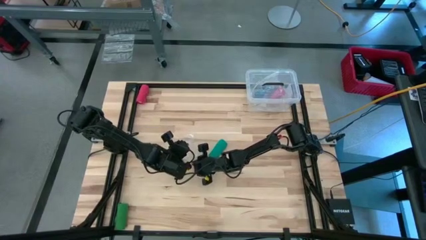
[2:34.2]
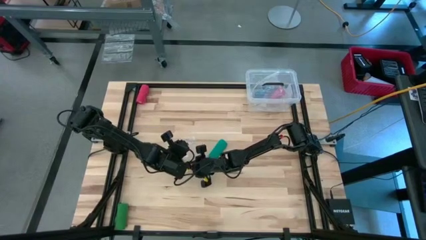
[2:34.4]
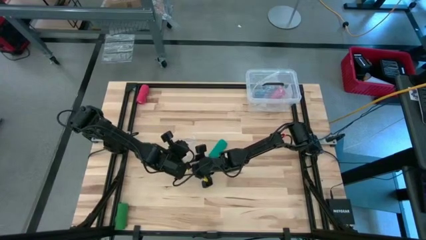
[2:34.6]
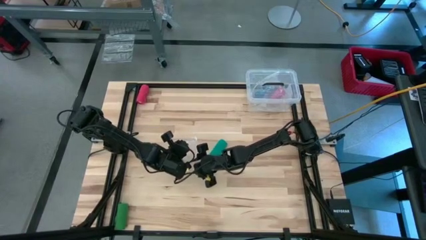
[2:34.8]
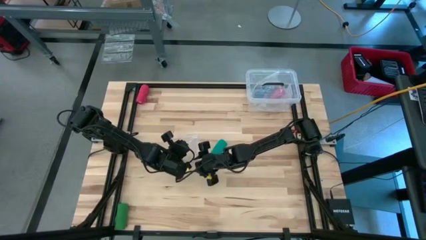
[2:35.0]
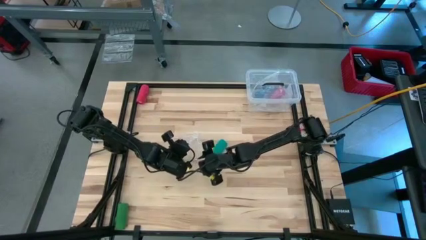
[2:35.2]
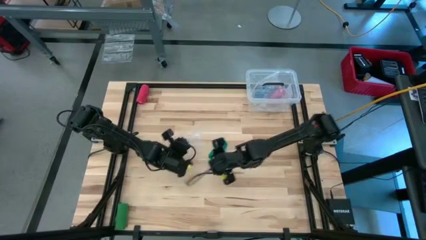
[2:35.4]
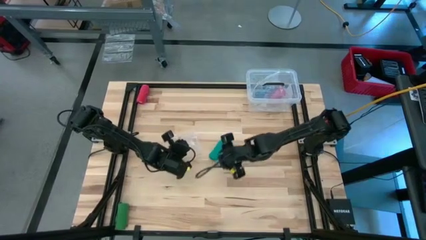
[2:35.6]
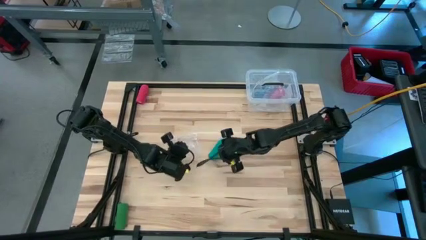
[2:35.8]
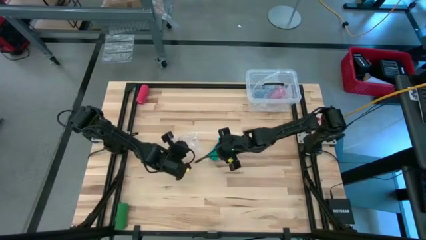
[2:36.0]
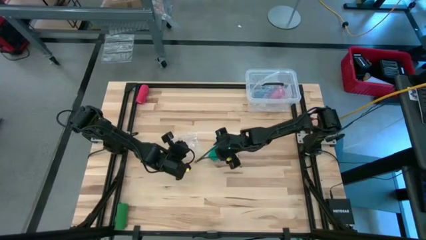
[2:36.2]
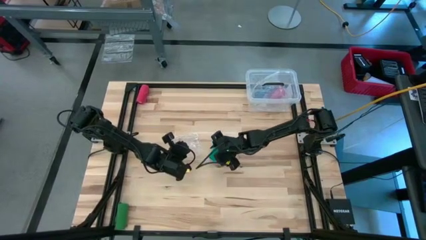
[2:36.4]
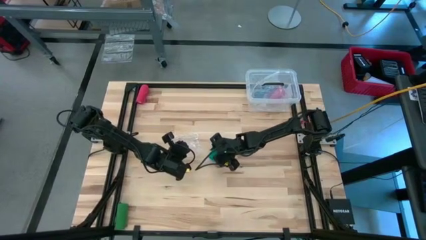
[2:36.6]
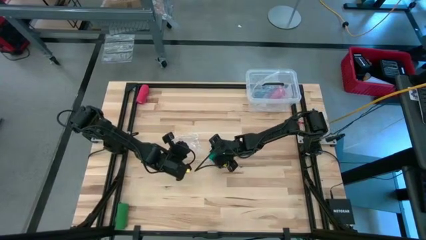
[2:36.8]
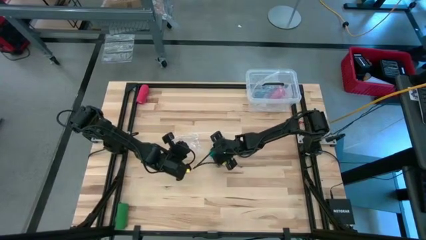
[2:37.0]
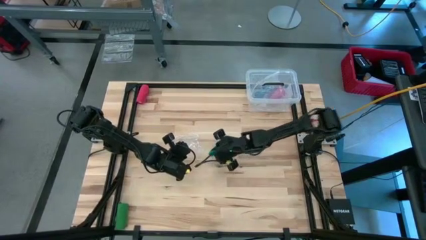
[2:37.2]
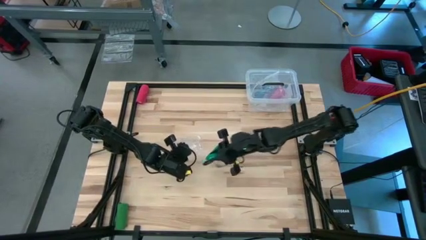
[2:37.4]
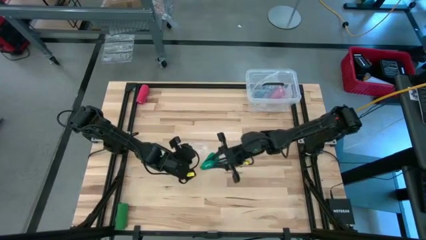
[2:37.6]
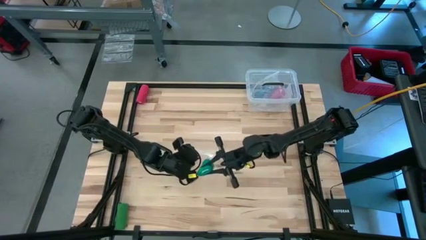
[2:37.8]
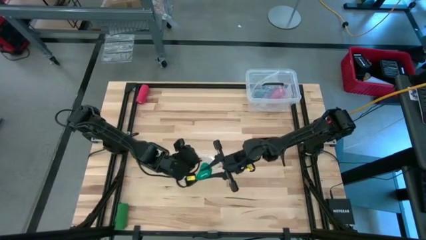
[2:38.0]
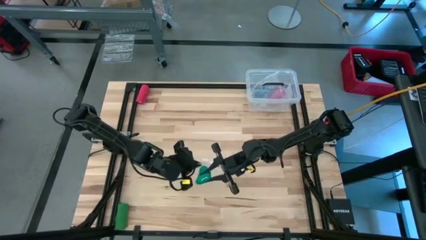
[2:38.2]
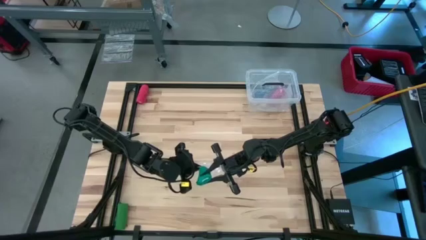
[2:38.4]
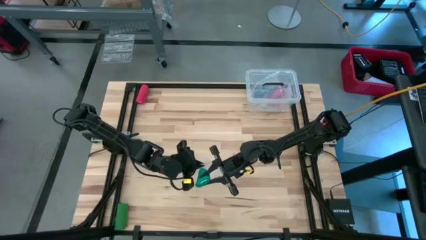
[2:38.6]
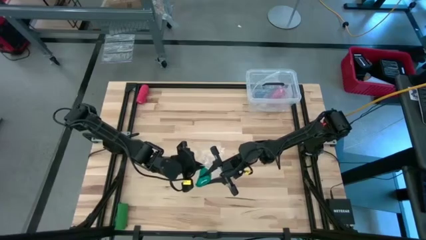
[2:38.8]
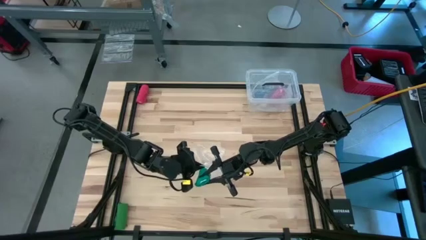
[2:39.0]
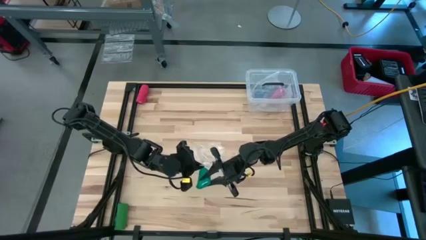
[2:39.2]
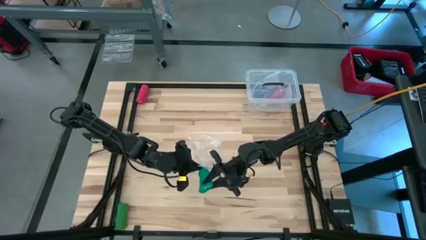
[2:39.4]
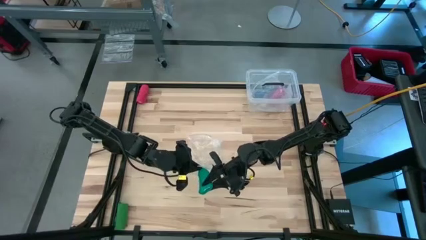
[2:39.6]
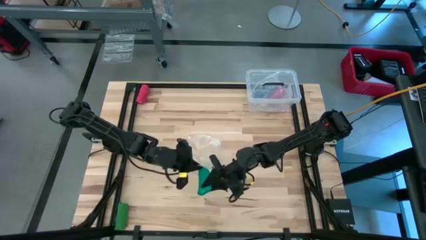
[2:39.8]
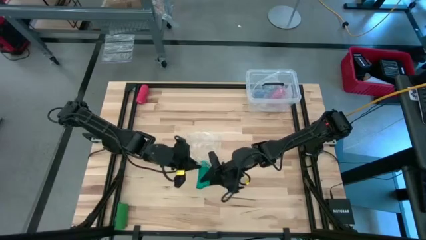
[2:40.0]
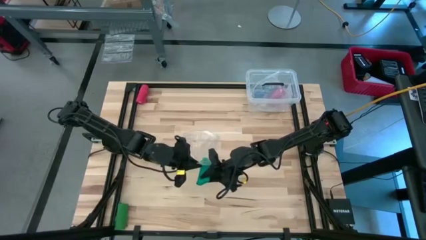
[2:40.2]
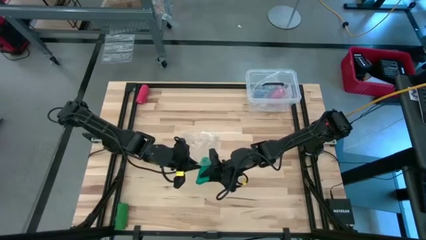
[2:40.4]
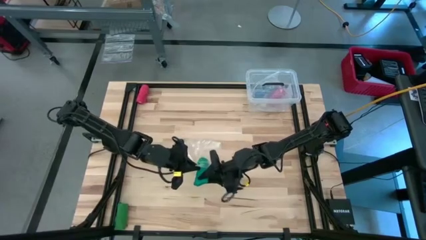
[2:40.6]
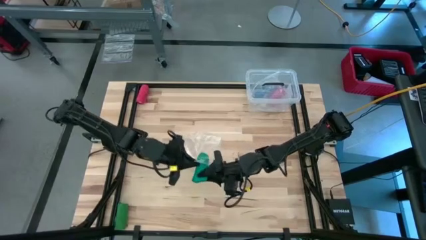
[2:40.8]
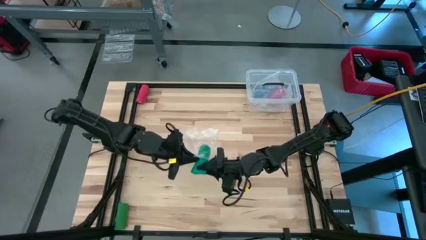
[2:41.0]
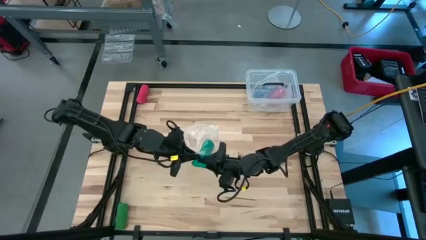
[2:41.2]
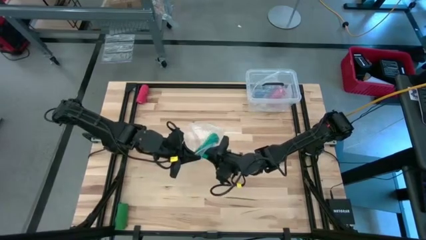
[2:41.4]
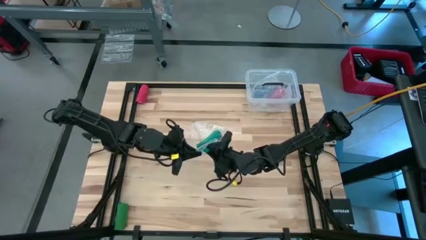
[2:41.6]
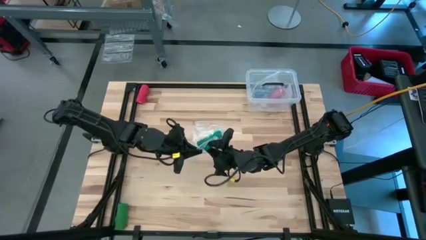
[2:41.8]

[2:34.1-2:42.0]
Task: Roll bandage
Put the rolled green bandage into the transparent zip bag

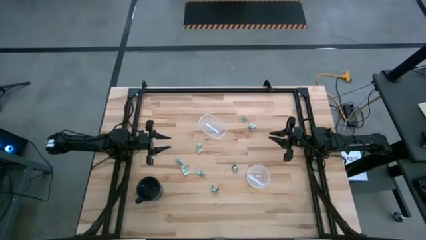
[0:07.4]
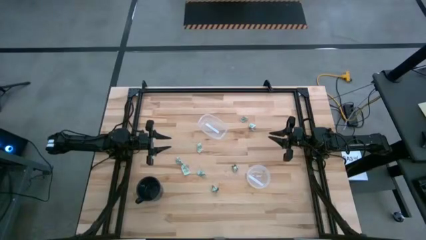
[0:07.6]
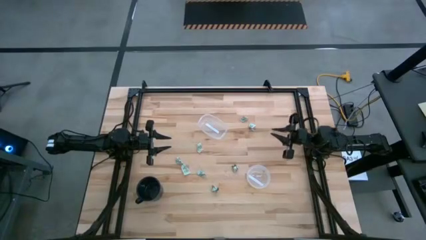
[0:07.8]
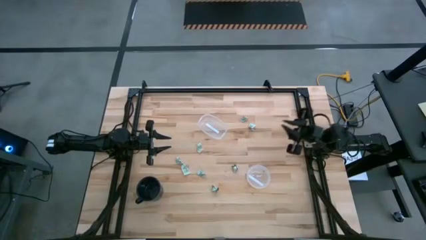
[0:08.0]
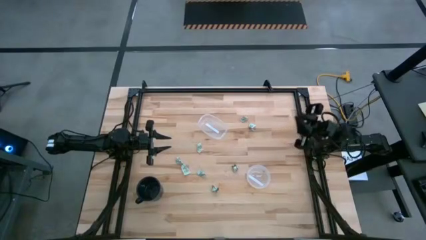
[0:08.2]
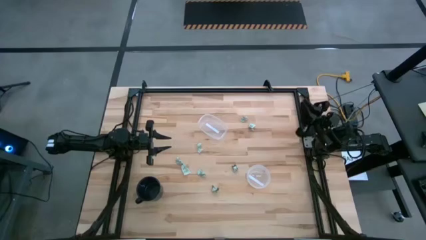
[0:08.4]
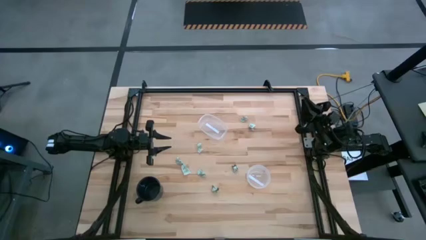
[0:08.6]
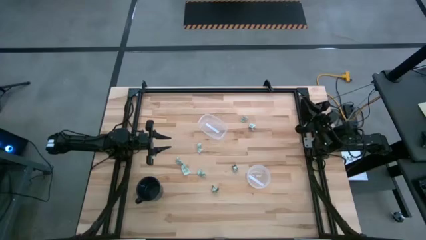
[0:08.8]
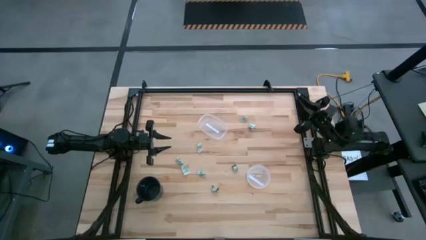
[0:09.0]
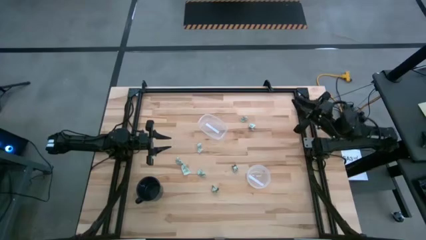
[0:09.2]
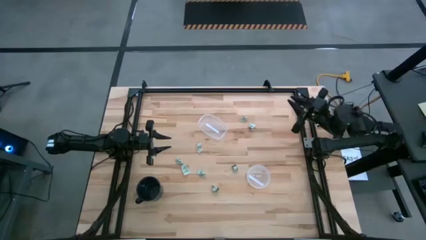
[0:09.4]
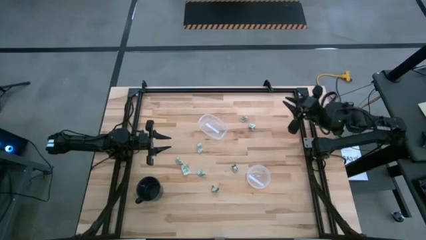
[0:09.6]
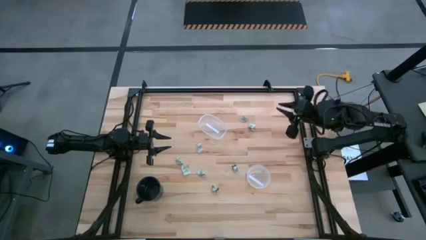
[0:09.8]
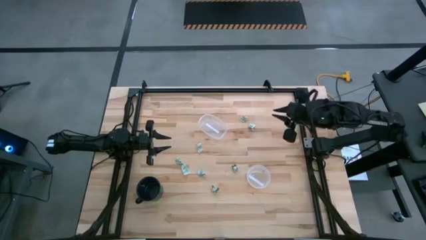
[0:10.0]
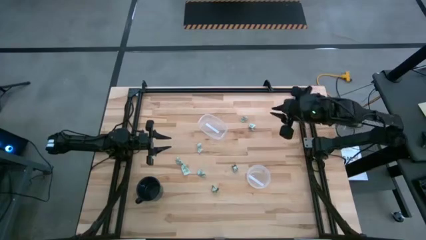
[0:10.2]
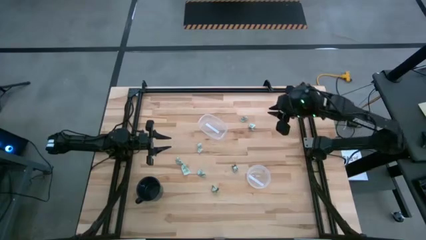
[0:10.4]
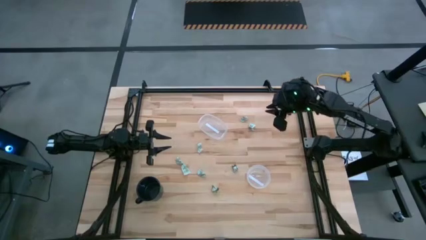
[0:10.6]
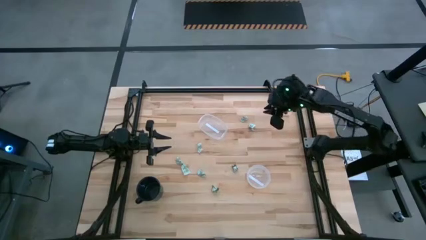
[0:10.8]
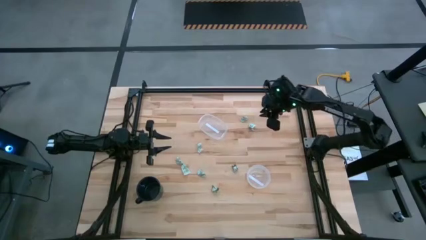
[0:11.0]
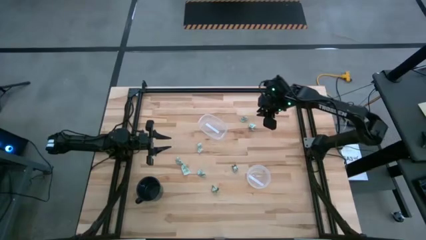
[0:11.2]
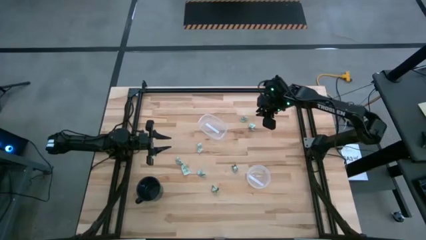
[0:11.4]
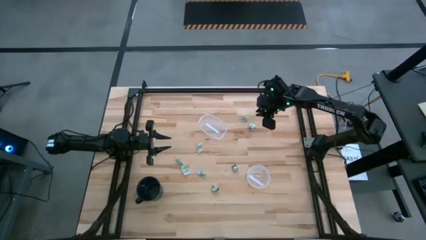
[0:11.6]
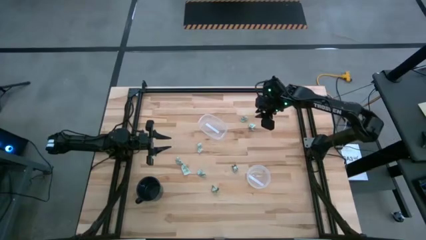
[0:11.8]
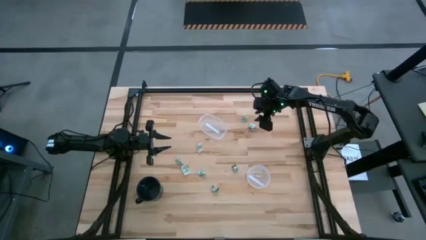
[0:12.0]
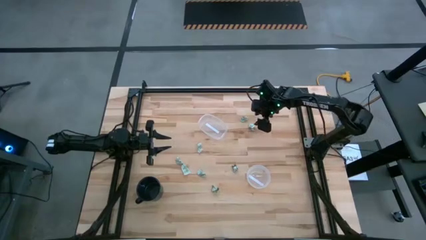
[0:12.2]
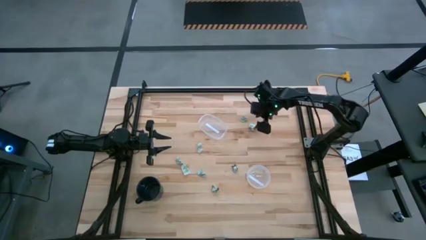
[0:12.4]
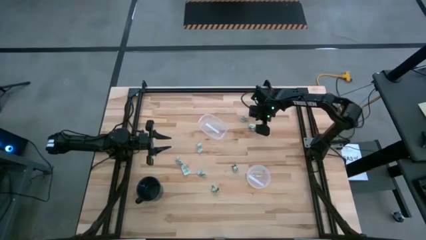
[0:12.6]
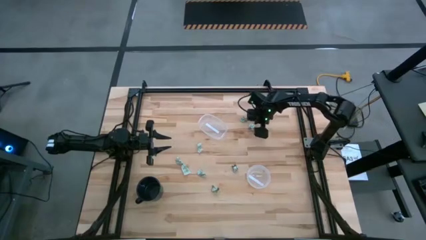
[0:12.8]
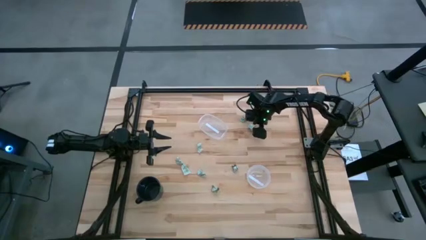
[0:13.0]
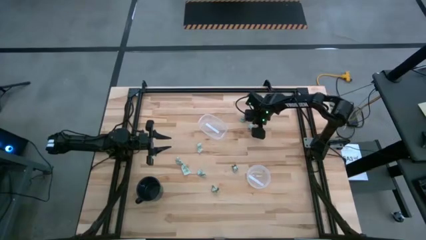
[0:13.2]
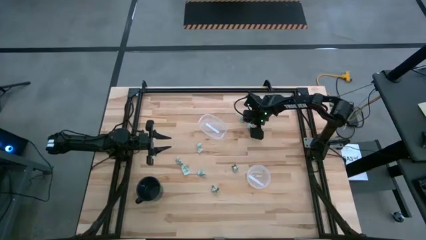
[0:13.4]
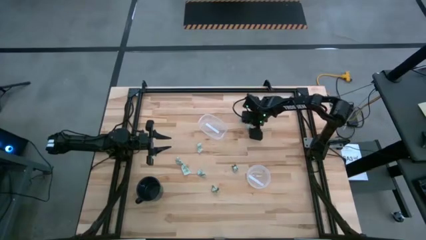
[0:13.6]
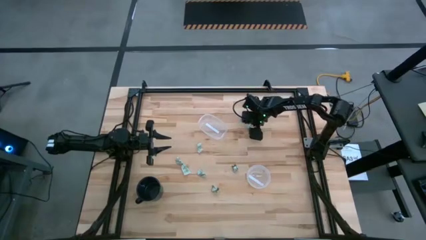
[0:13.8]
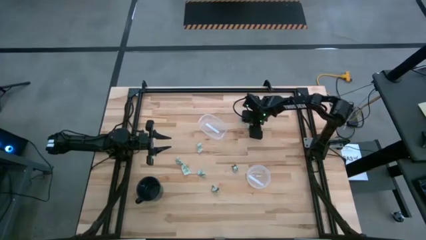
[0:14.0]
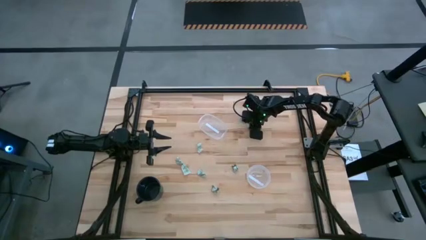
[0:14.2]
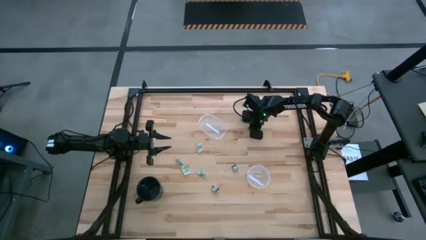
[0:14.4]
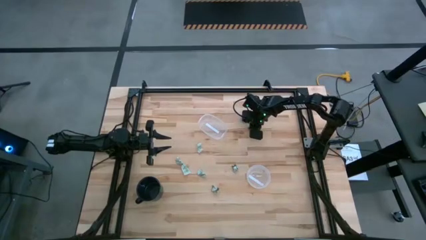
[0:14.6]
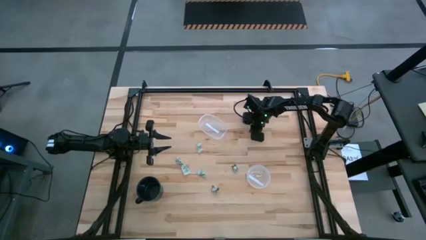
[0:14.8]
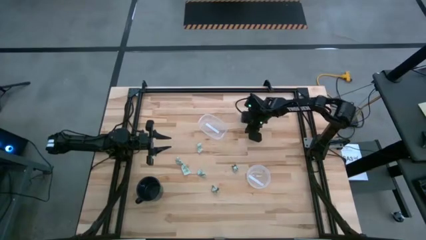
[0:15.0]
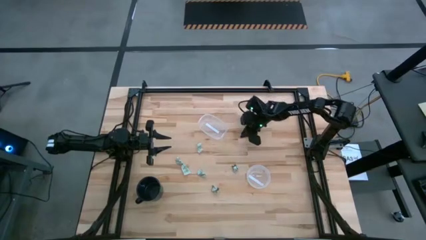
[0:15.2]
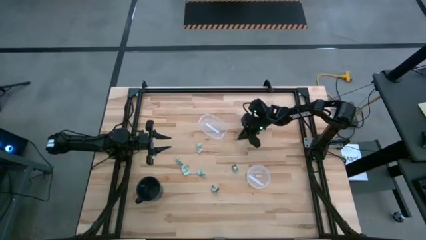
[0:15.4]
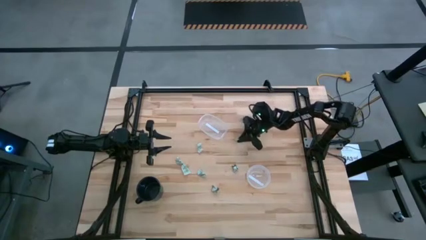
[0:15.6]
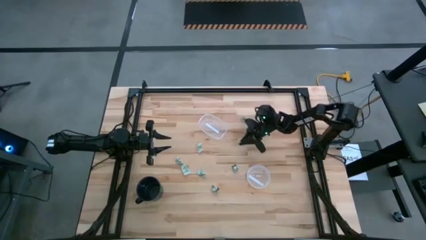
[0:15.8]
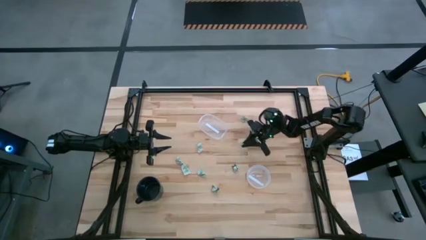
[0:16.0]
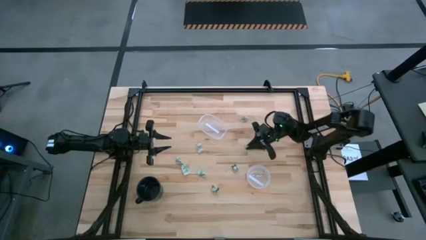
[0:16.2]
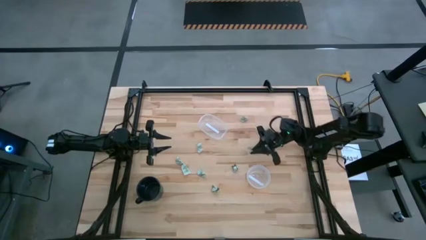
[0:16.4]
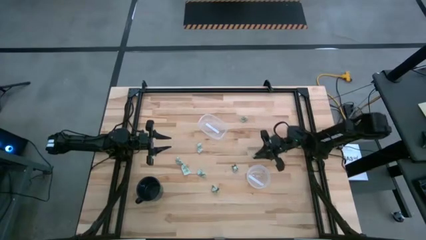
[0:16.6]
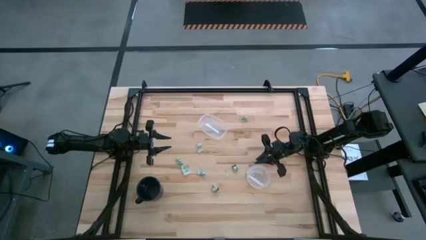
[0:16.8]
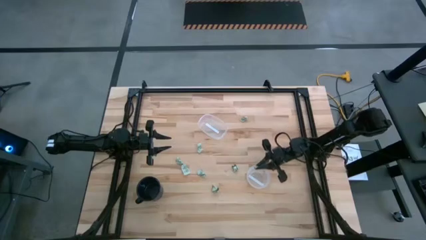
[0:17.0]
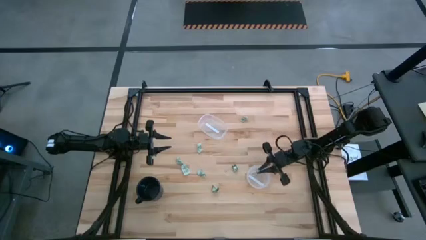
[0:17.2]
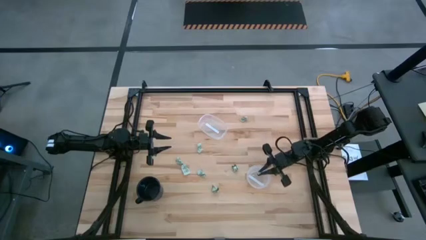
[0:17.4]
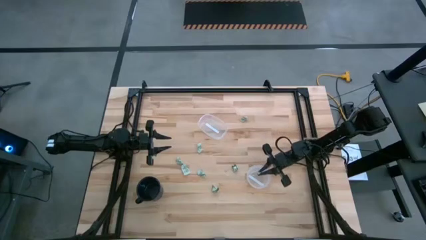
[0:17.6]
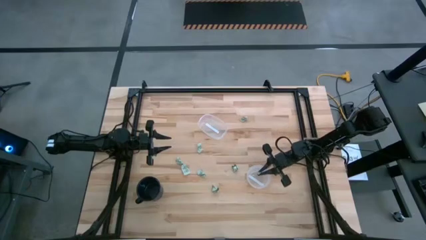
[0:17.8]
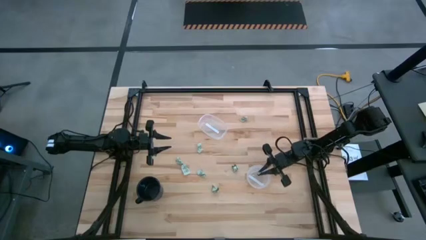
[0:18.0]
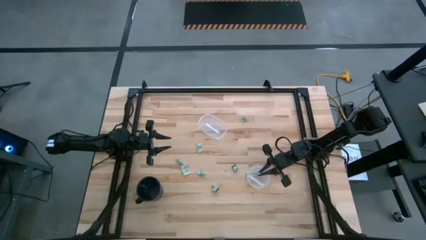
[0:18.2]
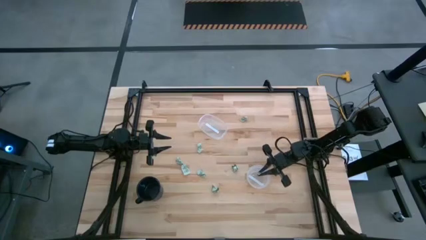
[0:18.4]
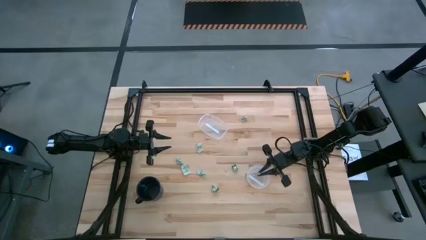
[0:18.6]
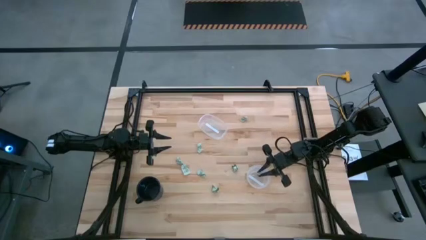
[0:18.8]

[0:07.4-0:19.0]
Task: Pick and place Stevia / Truvia into bins
Put the stevia packet into the round transparent container
